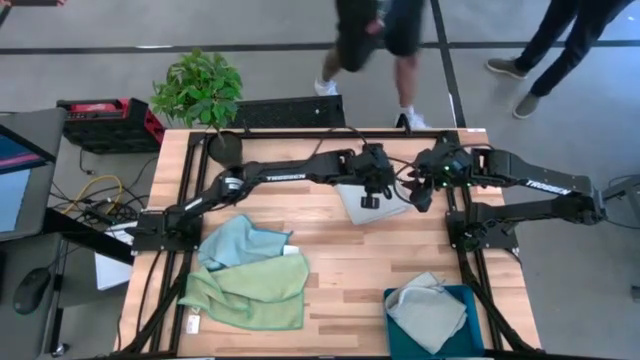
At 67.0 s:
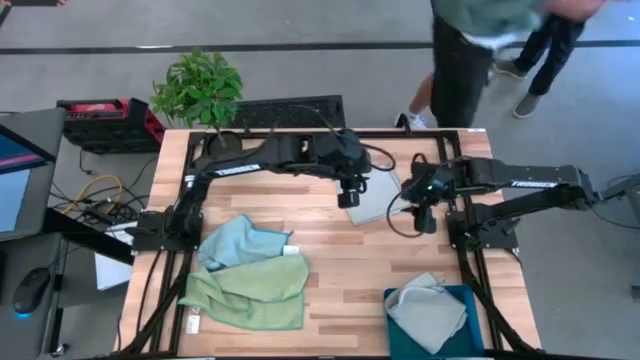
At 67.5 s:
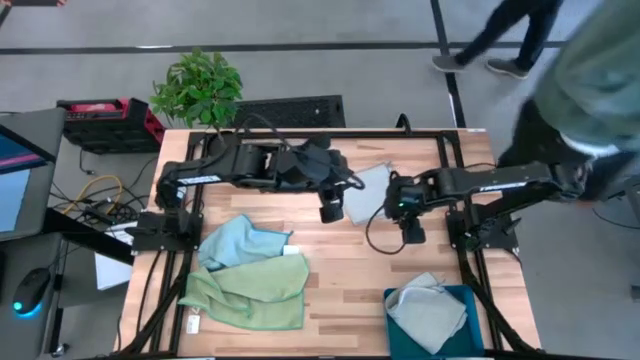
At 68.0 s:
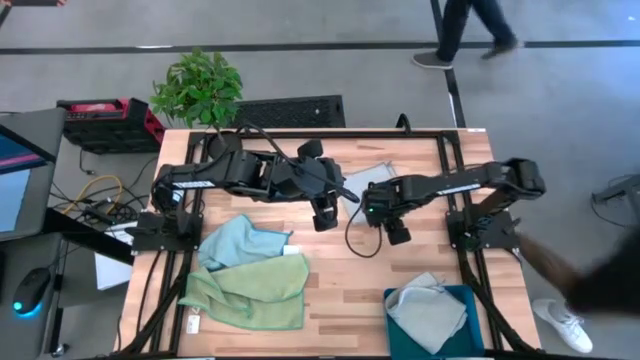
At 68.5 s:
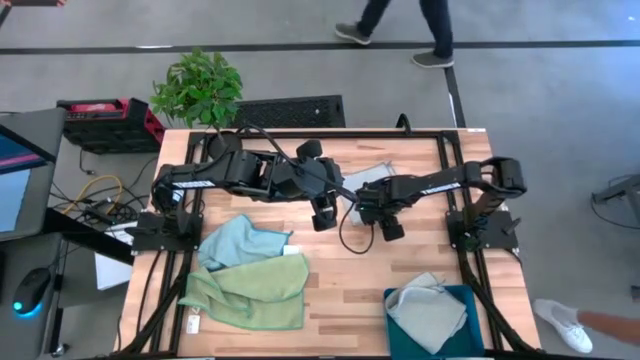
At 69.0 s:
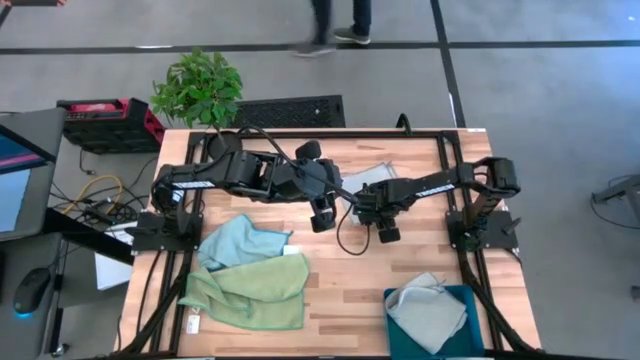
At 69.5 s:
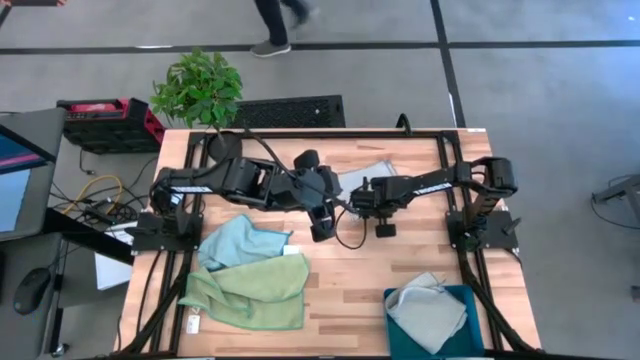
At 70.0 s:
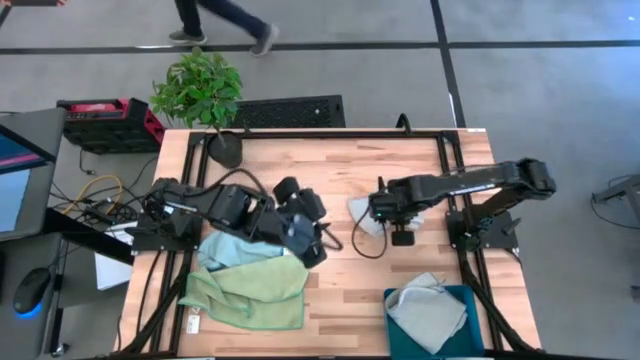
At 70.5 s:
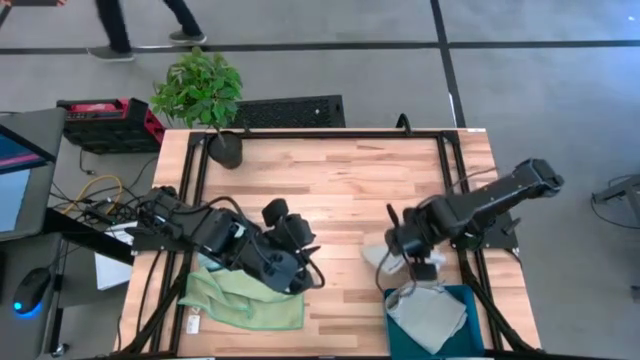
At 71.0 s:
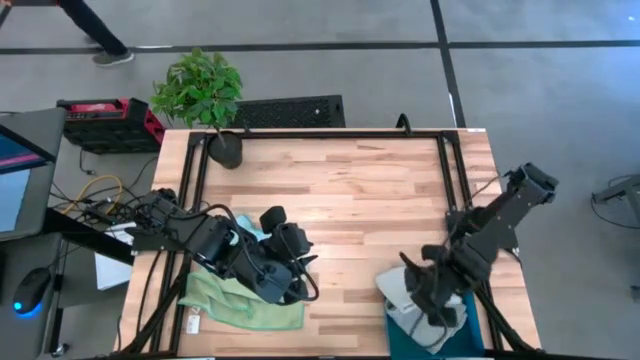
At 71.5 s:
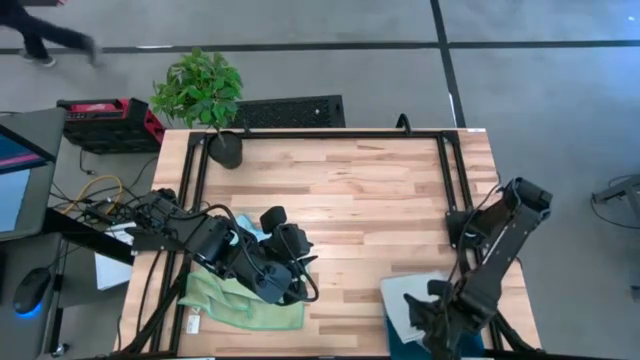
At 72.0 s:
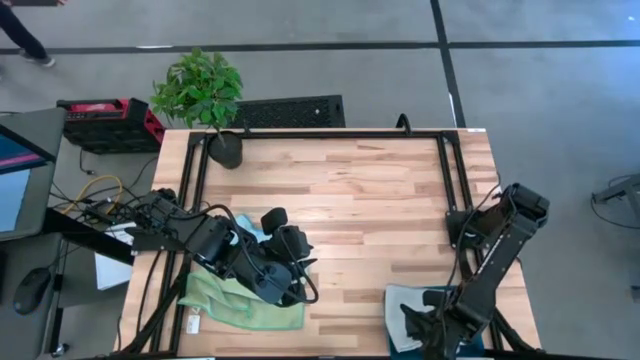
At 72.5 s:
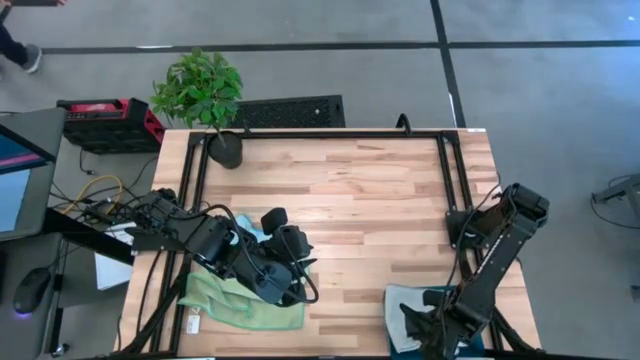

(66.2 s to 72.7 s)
Task: Fold microfiber towels
Put the folded gray microfiber towel into the blue bin

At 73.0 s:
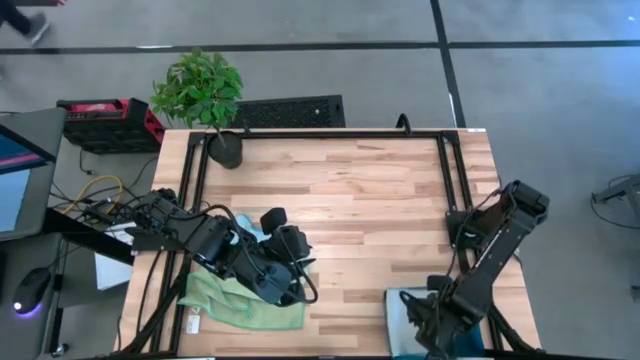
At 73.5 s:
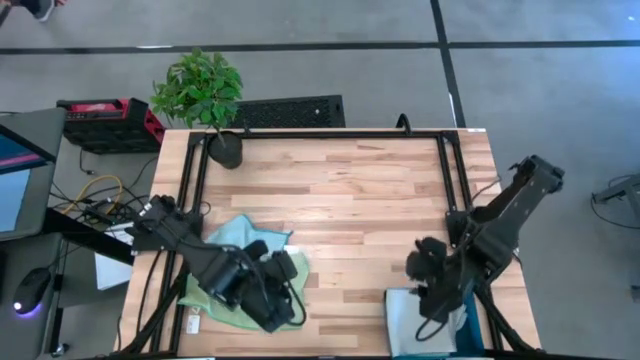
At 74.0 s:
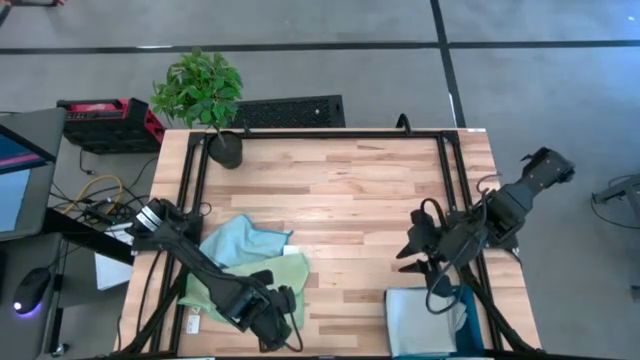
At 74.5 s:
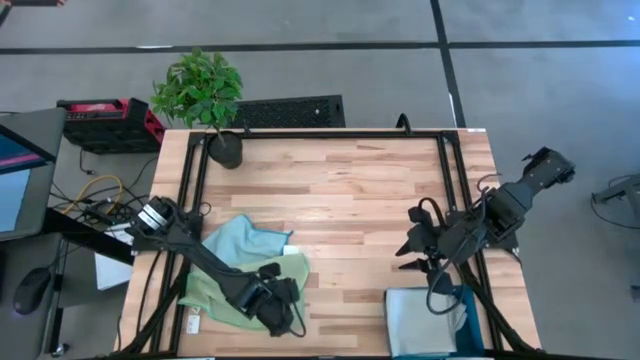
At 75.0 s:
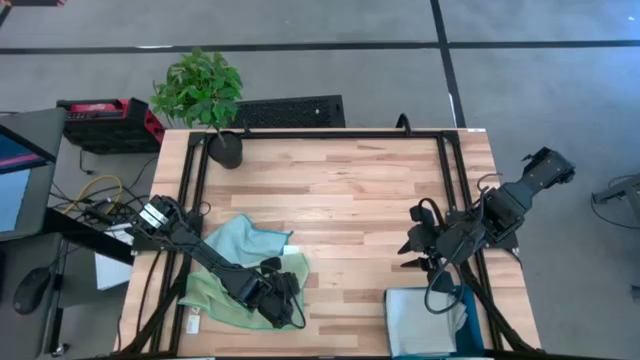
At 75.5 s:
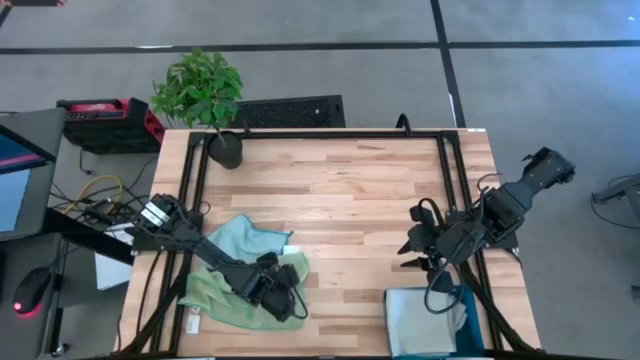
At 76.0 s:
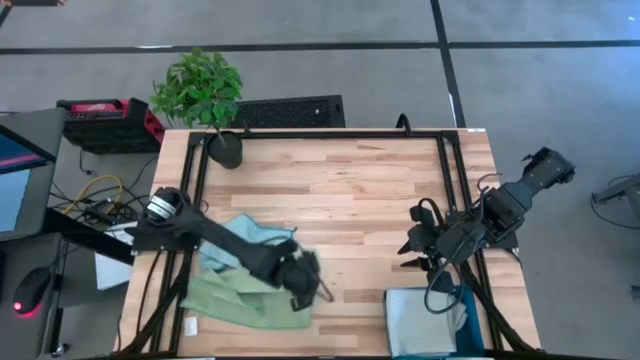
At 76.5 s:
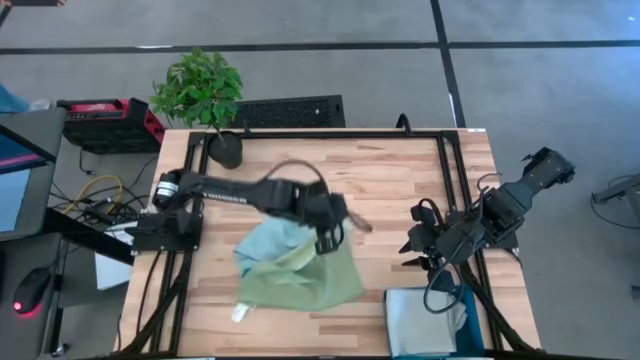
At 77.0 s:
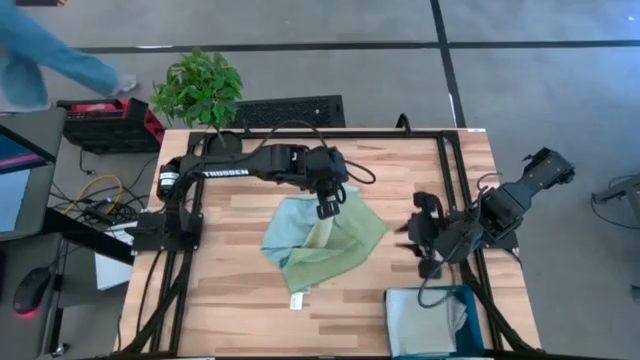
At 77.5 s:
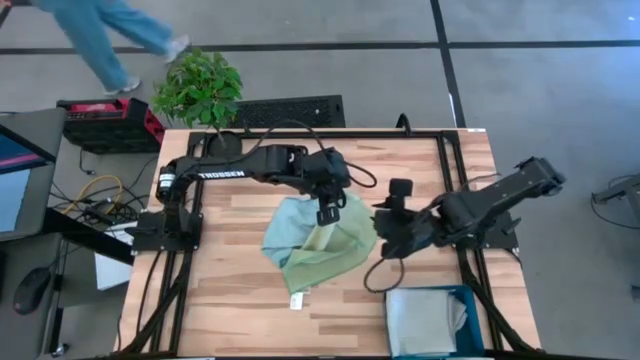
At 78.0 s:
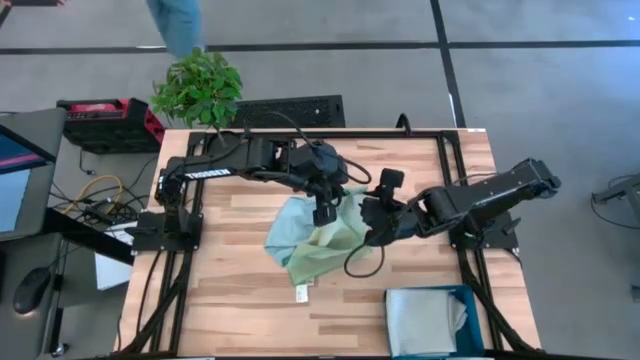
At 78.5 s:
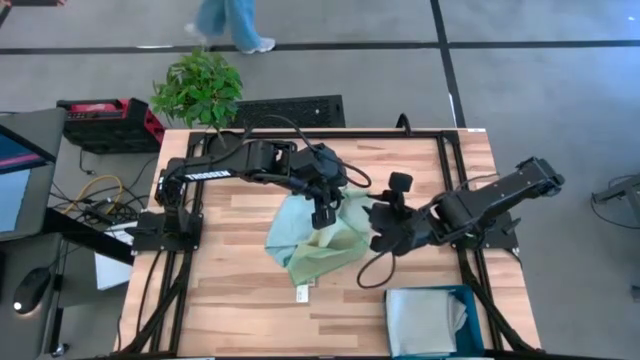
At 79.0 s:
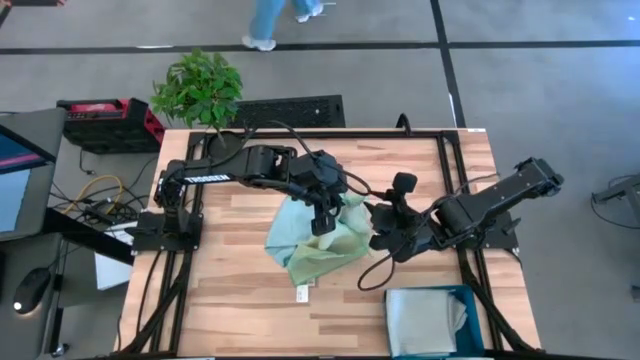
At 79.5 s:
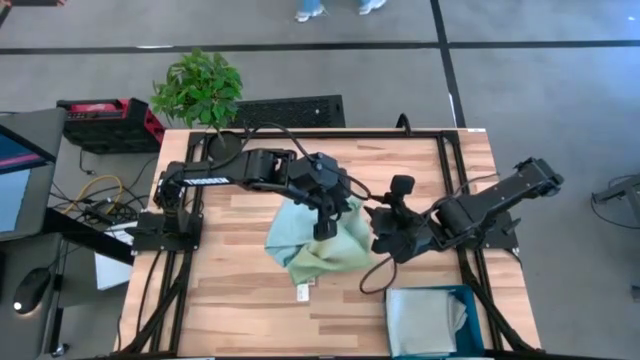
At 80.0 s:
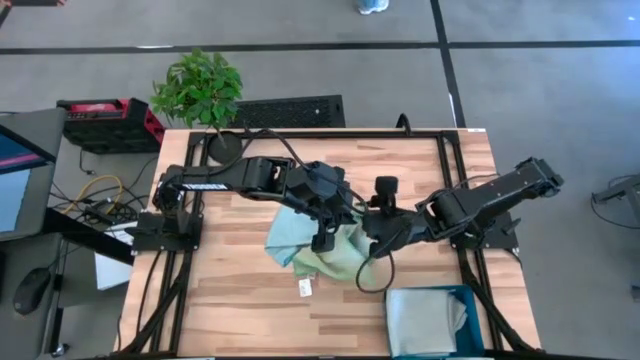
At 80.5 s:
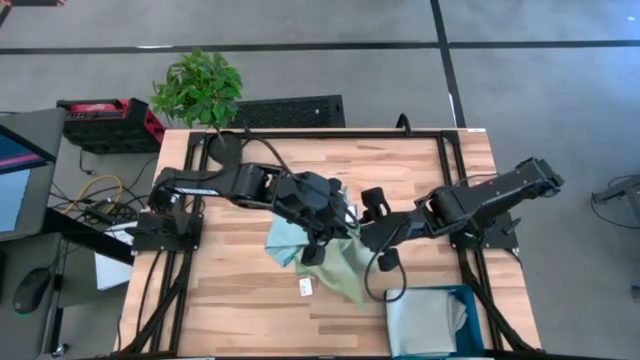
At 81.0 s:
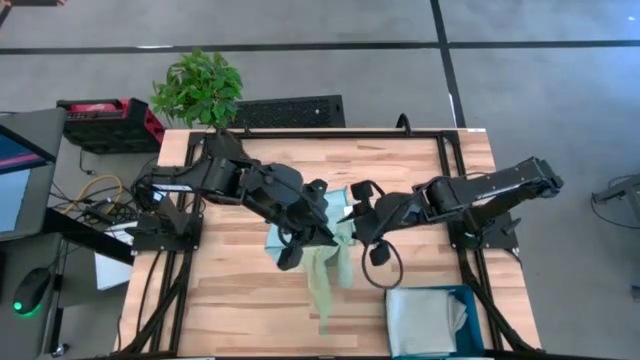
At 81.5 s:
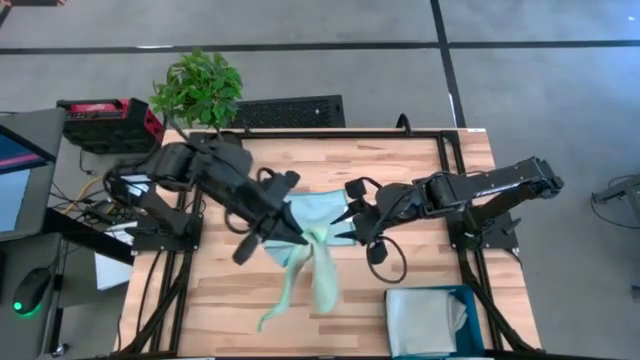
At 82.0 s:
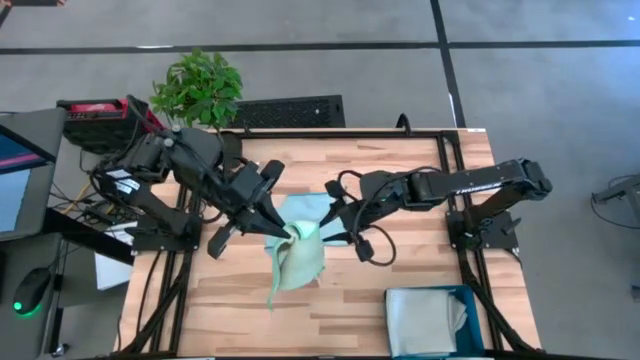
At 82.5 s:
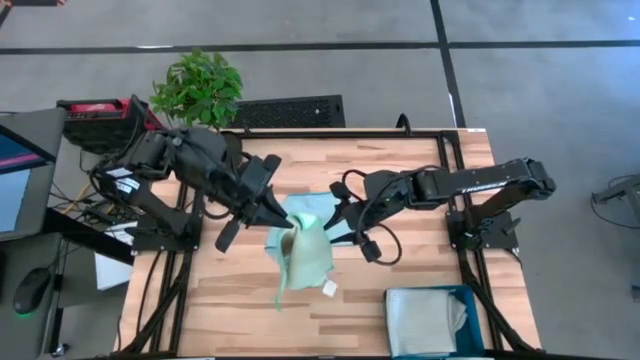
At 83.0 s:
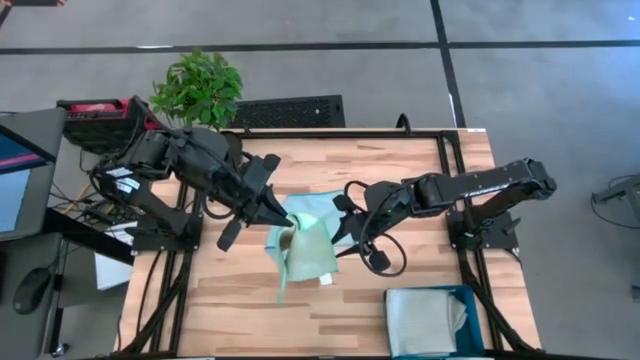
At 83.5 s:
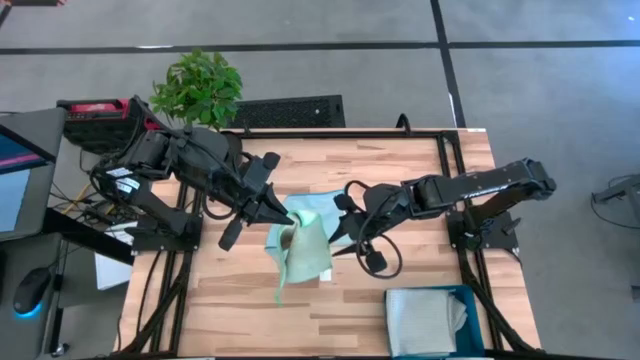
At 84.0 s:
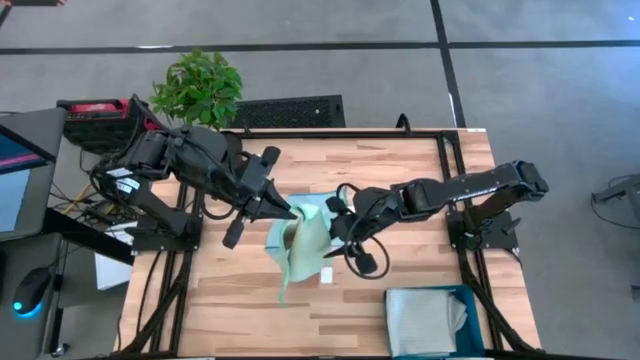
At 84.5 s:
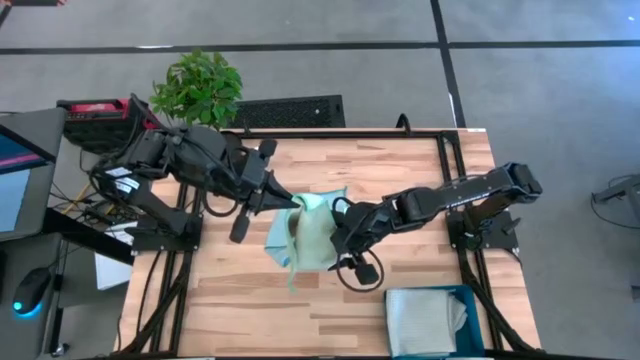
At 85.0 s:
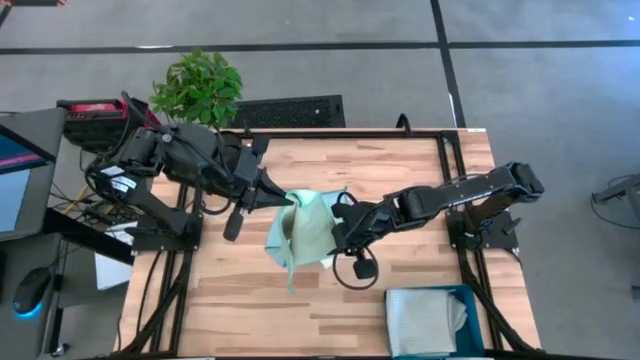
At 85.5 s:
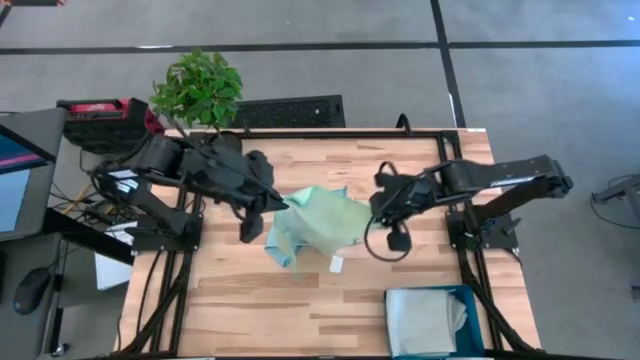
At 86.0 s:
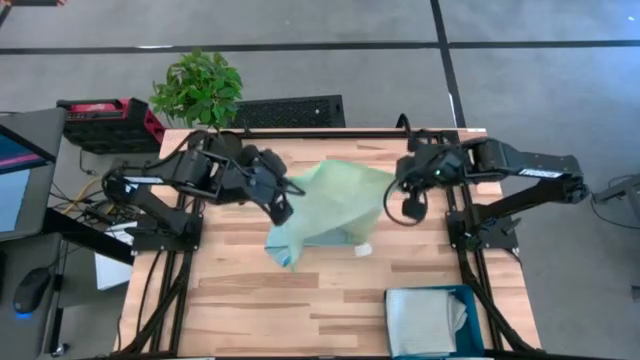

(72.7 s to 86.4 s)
Fold the green microfiber towel

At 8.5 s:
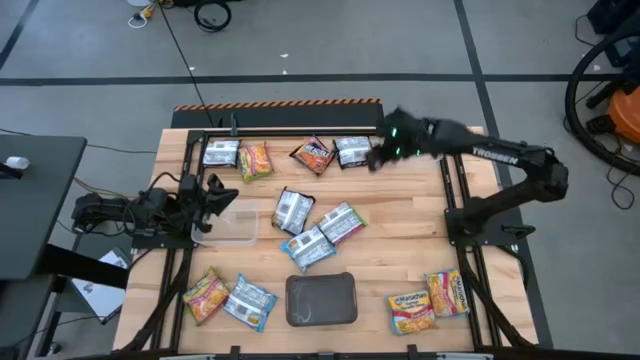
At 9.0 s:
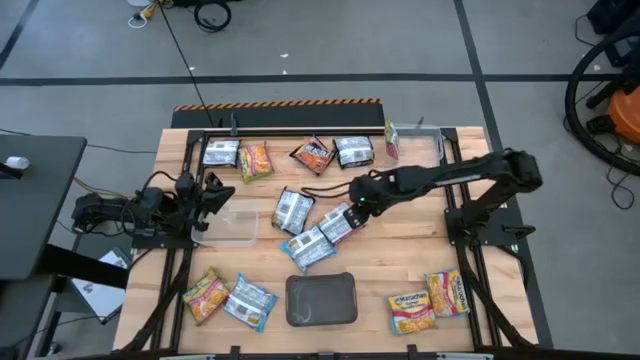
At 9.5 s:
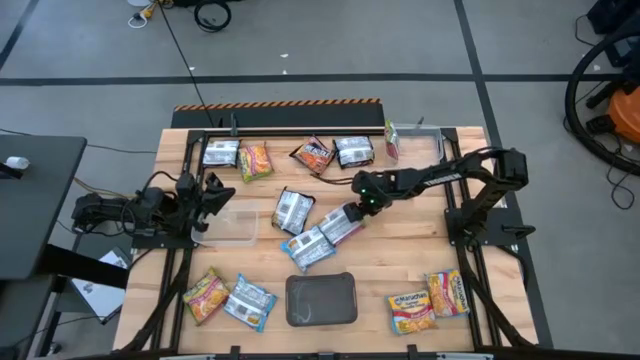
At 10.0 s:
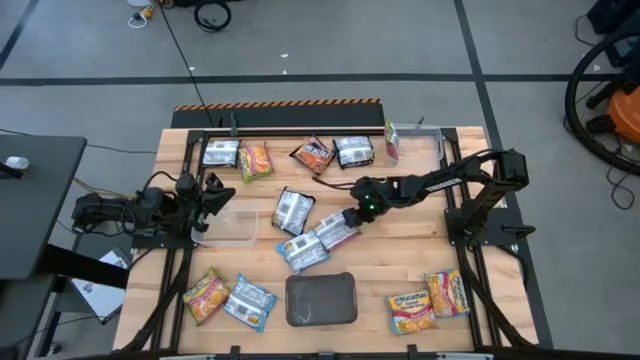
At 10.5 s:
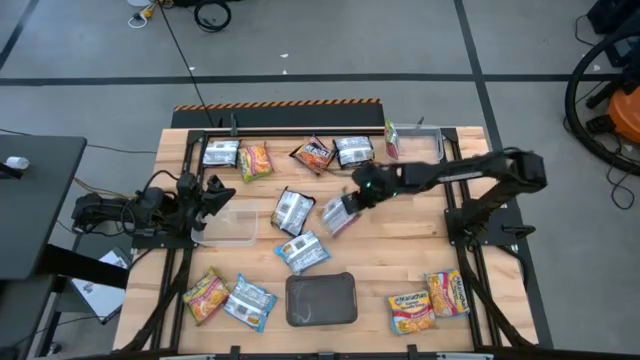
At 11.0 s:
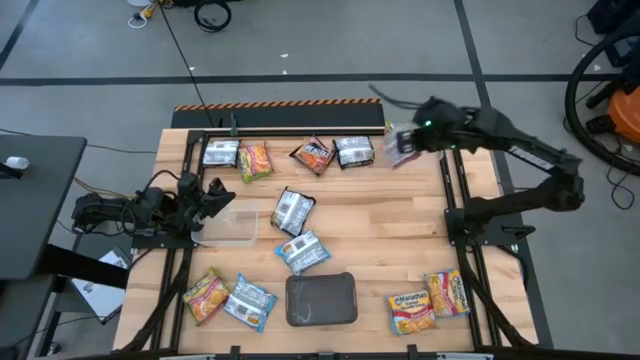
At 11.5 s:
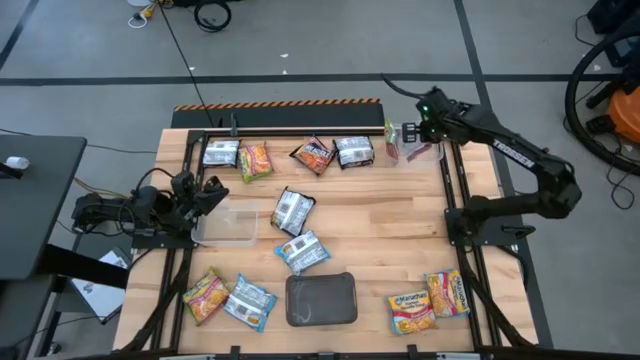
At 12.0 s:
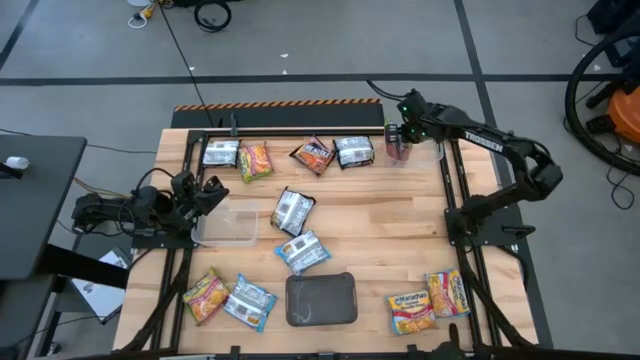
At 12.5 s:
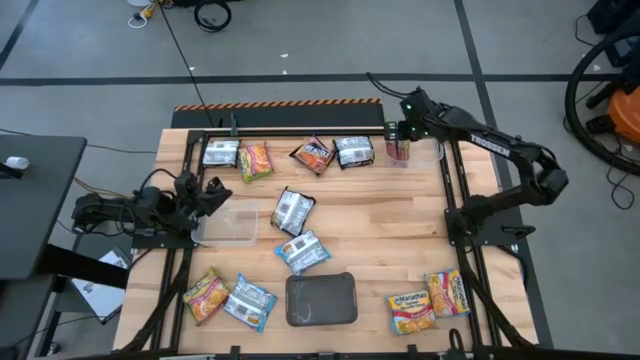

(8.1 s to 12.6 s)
Task: Sort Maruchan noodles
Put the green noodle pack into the top transparent bin
